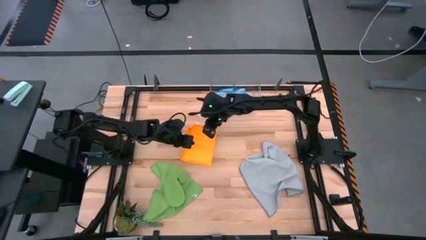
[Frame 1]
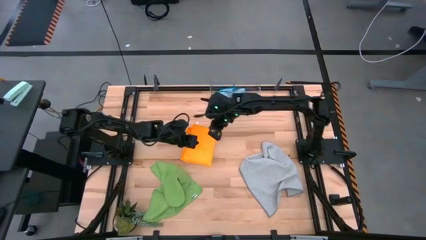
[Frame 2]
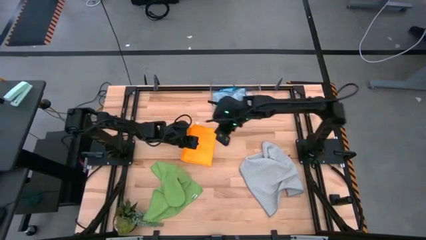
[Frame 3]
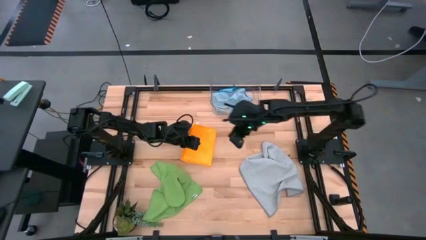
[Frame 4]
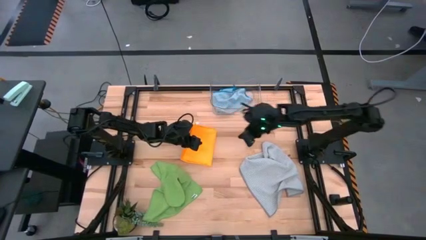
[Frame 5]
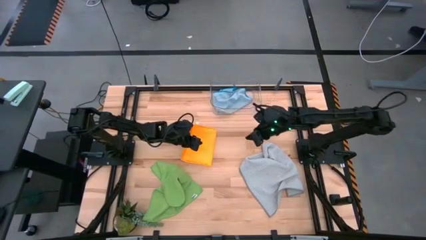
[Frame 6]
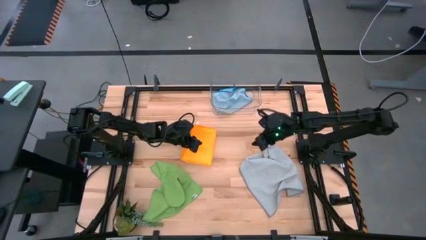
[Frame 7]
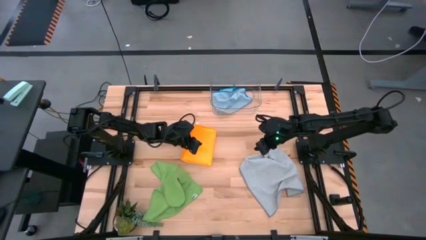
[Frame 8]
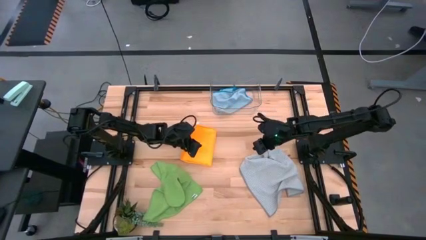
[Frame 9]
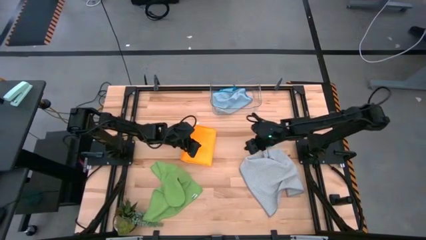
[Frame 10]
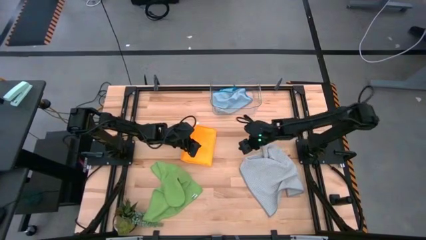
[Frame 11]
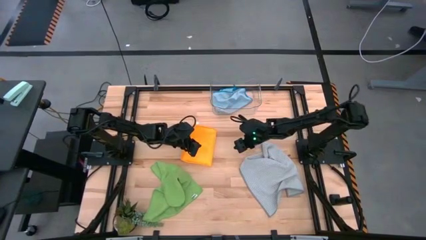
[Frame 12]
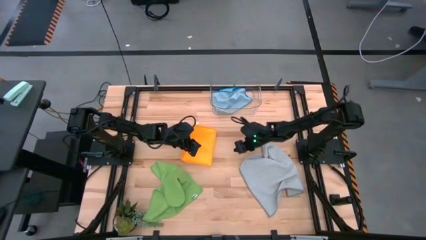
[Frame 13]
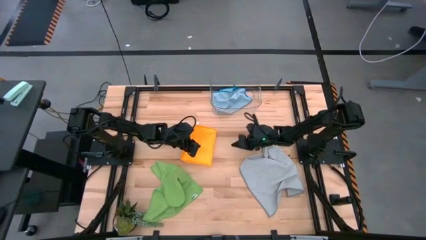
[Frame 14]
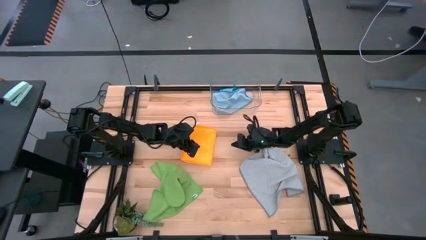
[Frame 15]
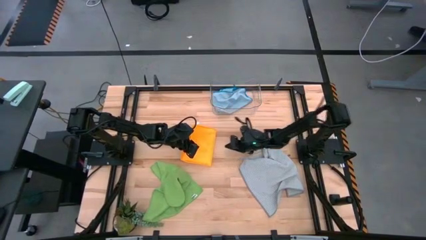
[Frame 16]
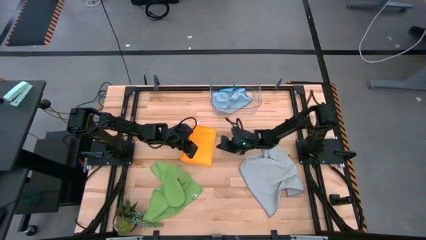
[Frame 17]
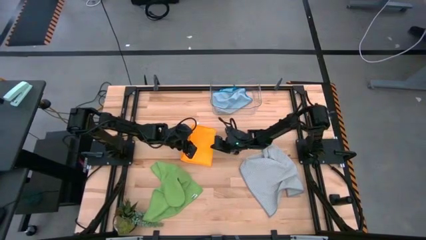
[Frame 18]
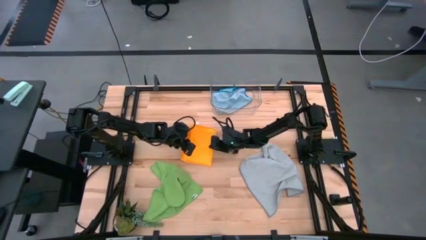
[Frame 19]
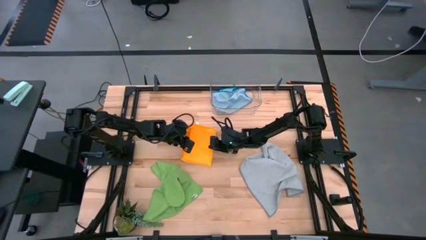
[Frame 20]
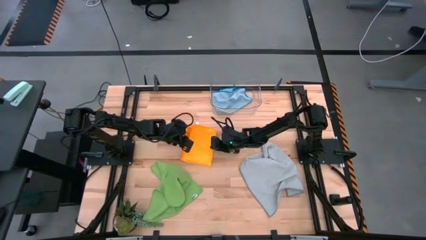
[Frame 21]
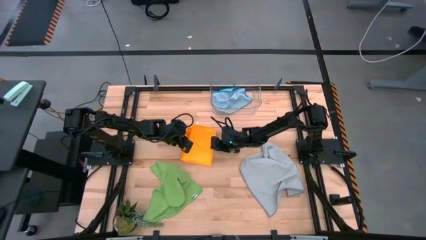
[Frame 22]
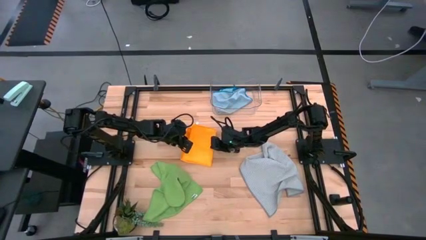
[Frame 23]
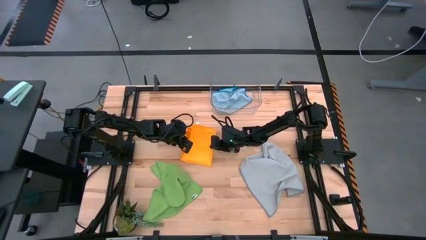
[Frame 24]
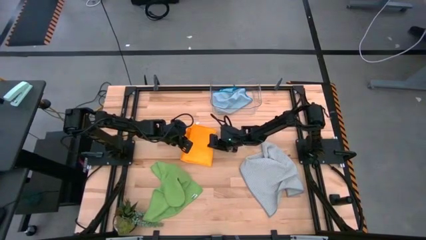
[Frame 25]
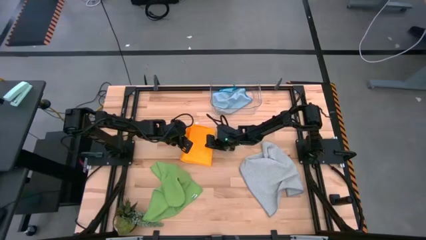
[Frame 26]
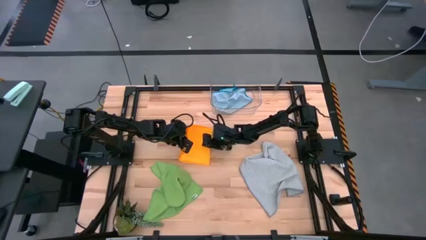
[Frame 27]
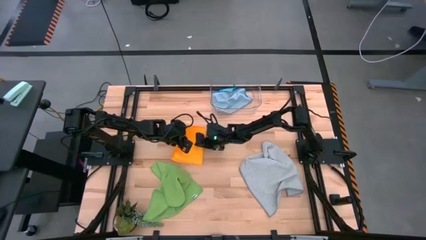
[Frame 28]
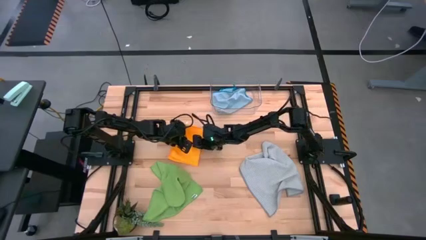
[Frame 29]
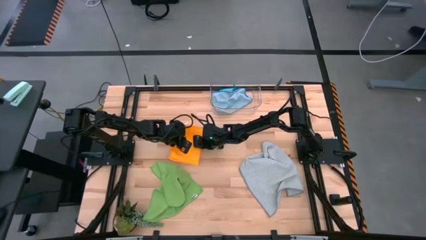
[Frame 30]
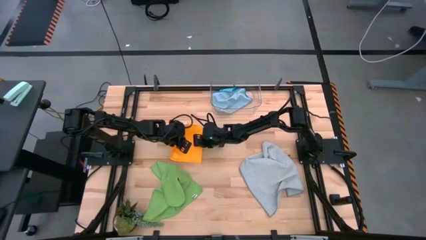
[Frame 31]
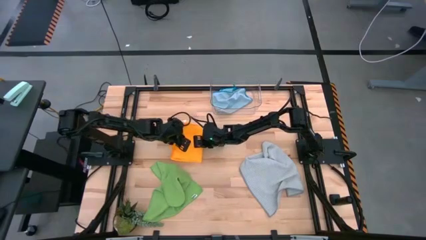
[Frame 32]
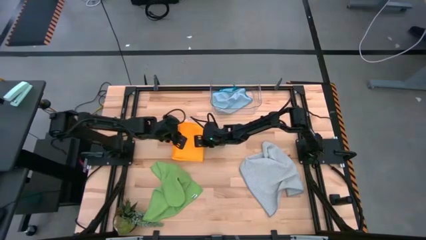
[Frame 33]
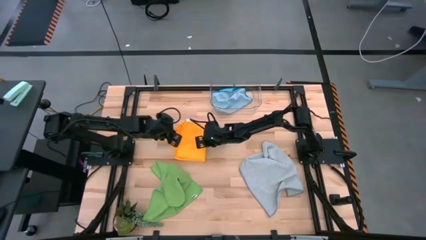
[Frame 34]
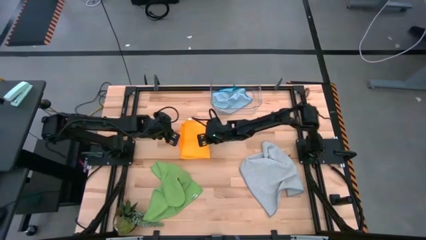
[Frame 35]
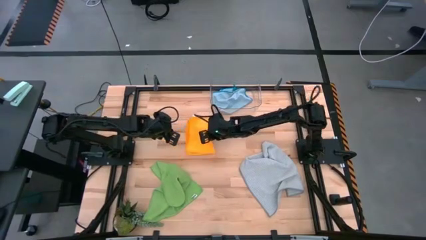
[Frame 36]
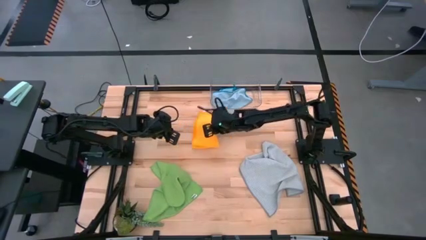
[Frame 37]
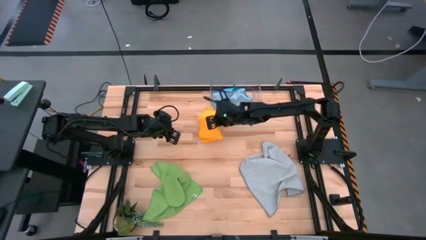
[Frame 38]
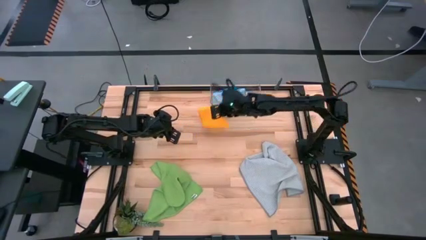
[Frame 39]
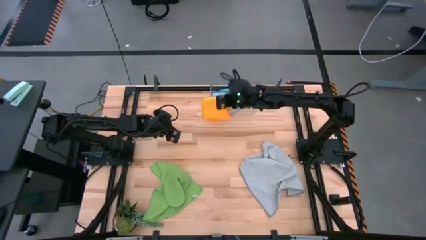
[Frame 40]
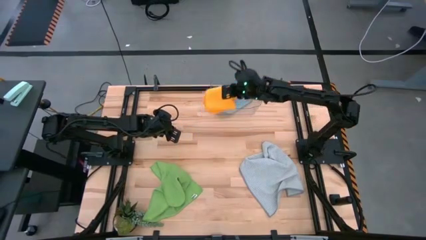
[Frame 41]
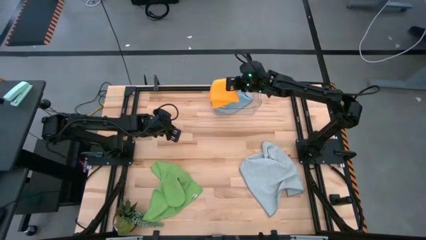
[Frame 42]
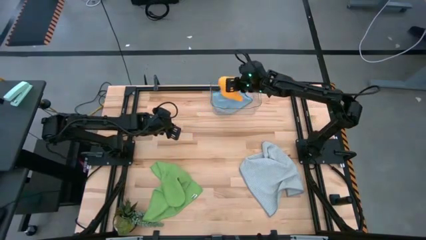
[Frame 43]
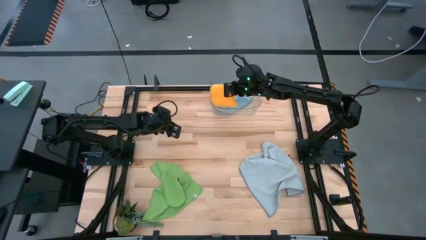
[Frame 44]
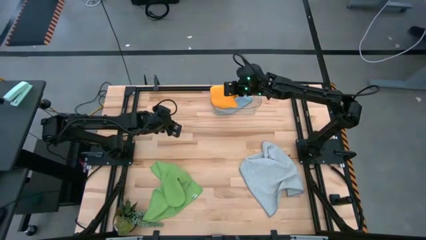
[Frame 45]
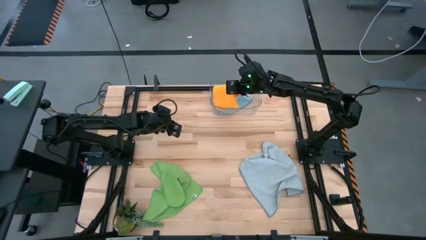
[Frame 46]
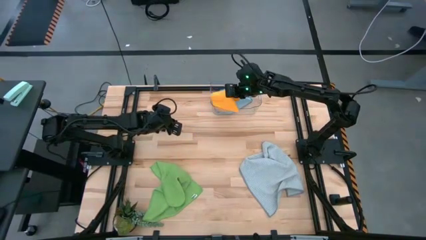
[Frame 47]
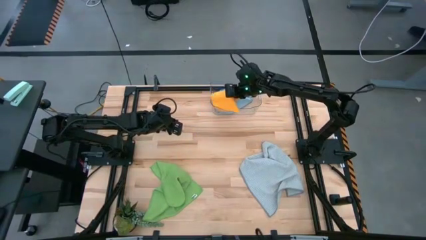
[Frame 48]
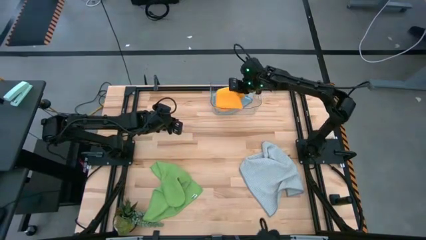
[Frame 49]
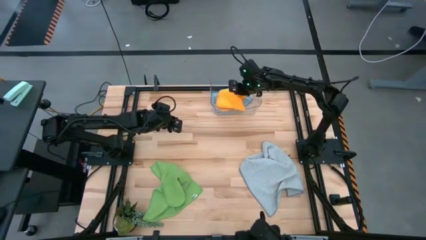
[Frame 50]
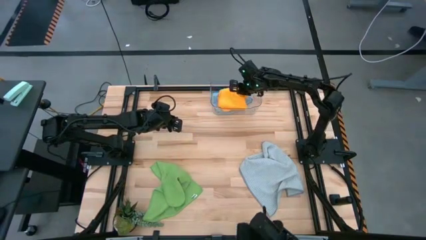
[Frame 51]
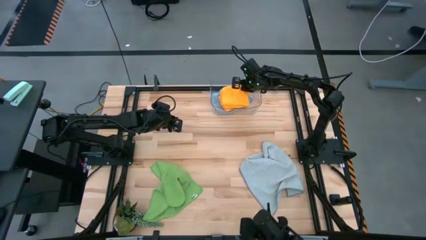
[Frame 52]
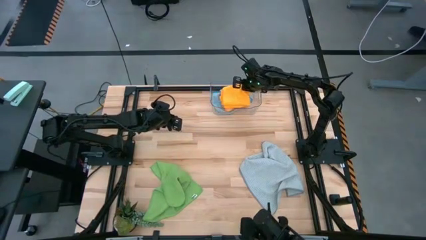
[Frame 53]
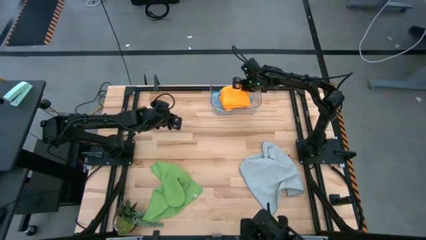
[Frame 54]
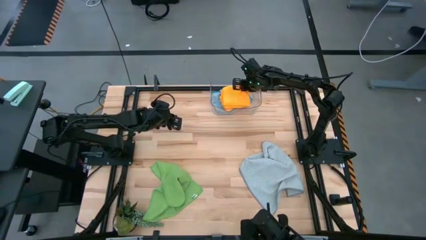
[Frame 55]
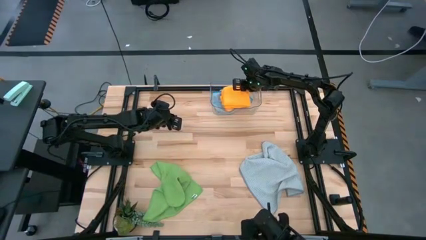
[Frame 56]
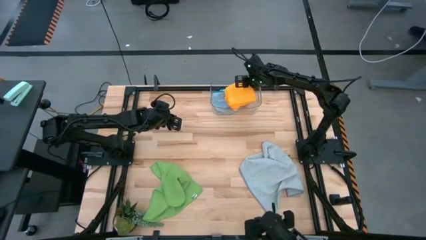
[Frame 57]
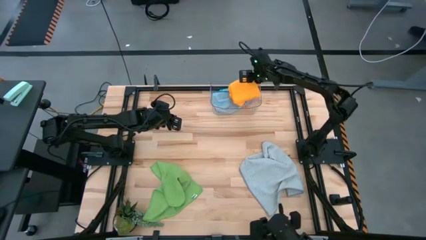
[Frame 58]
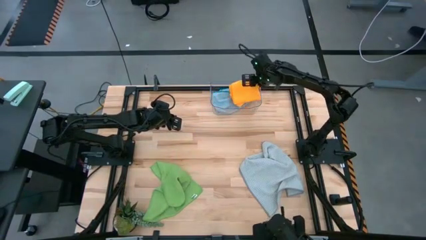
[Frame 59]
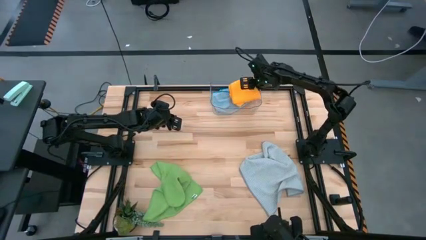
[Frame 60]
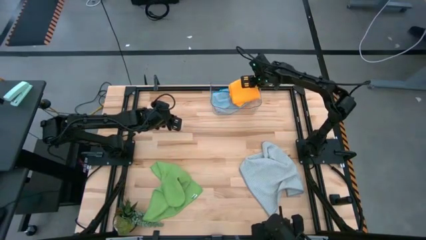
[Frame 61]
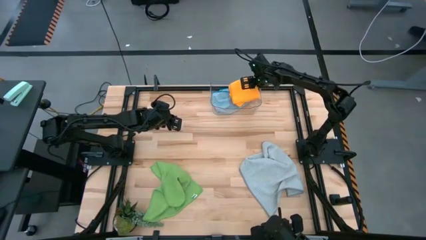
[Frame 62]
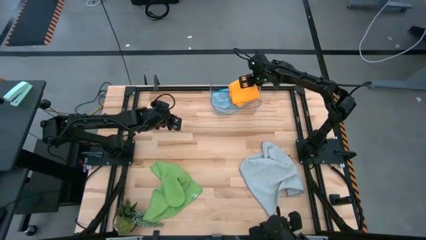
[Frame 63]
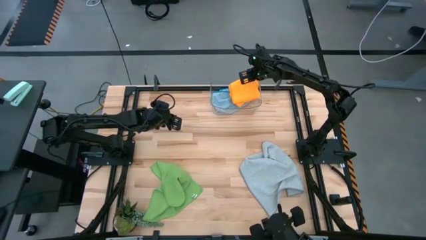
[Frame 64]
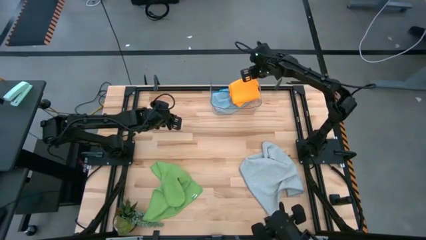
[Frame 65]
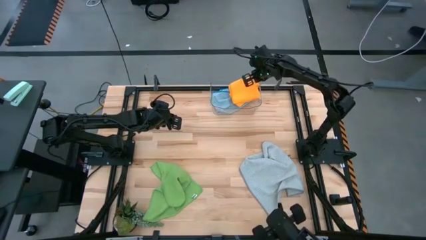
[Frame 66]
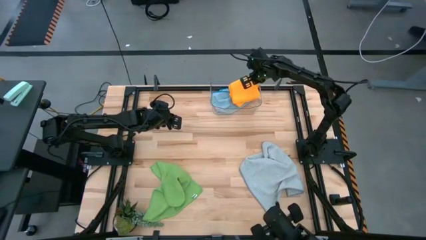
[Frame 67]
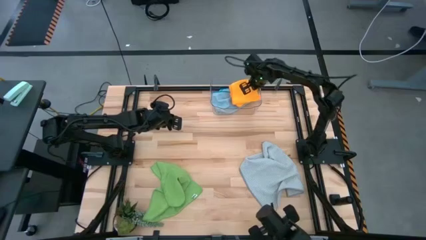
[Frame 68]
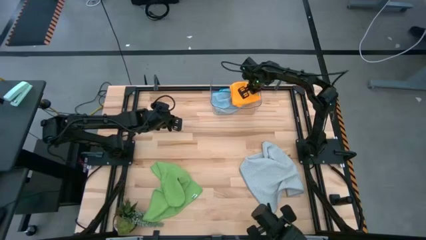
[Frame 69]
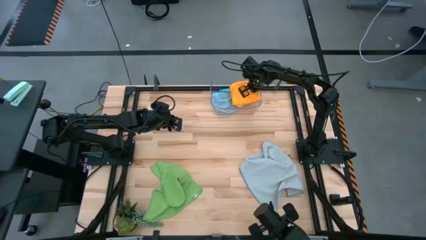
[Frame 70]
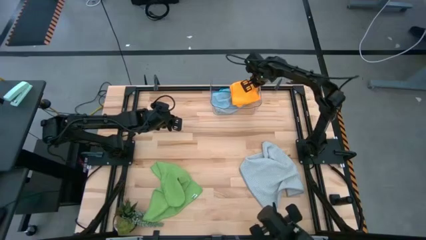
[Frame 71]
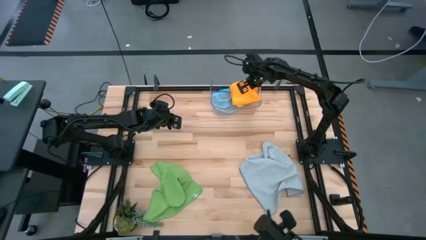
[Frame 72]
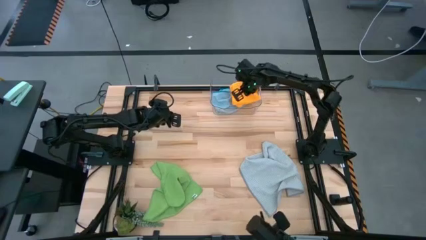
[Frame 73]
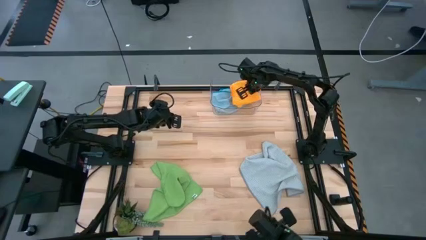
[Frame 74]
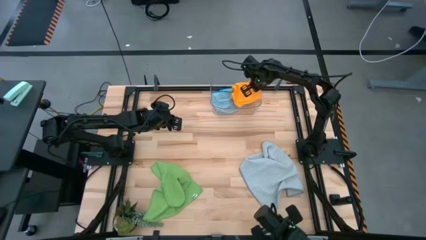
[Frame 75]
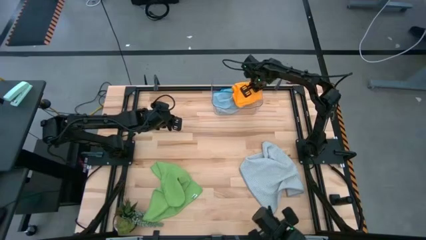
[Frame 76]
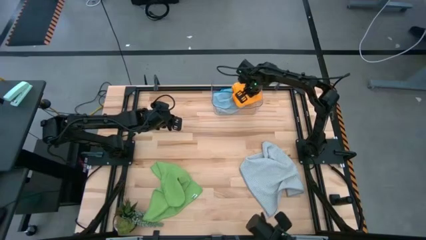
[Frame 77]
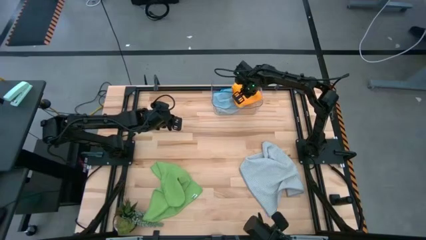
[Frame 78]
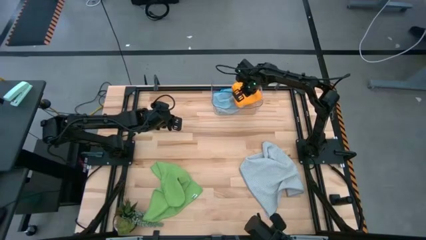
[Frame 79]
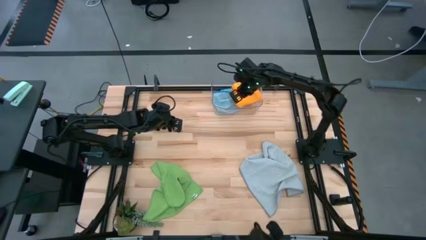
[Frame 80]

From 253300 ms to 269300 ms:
Task: Fold microfiber towels
Put the orange microfiber cloth into the transparent bin

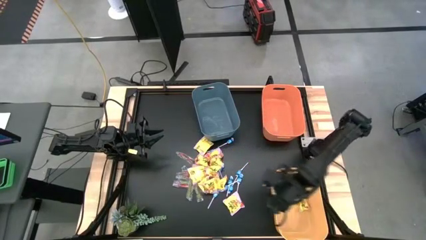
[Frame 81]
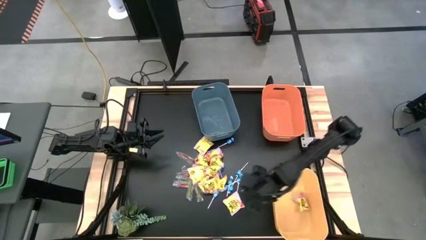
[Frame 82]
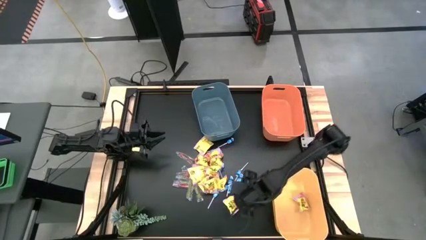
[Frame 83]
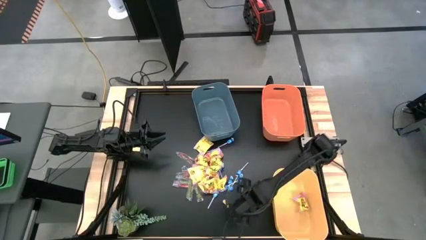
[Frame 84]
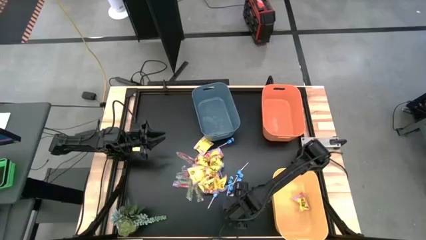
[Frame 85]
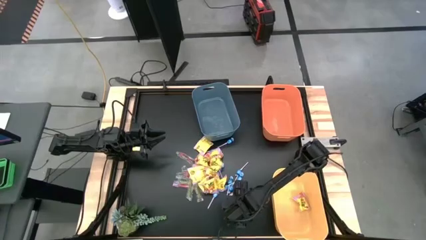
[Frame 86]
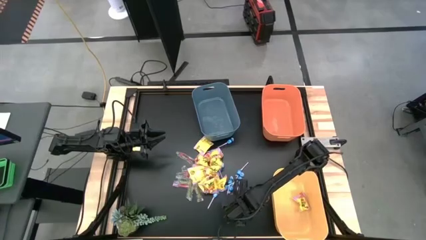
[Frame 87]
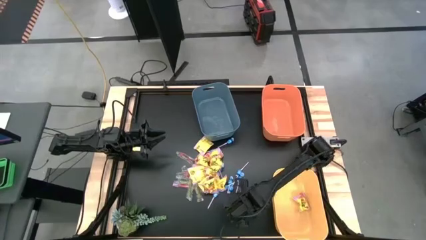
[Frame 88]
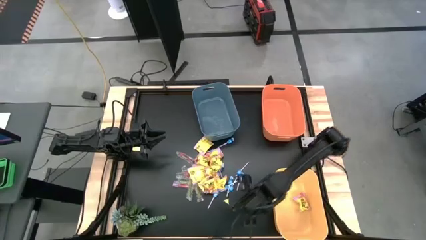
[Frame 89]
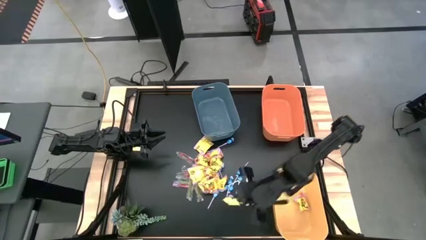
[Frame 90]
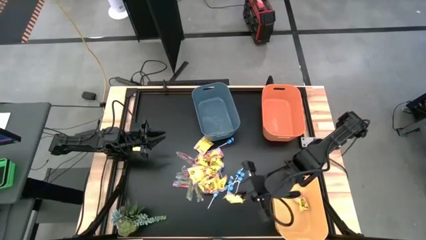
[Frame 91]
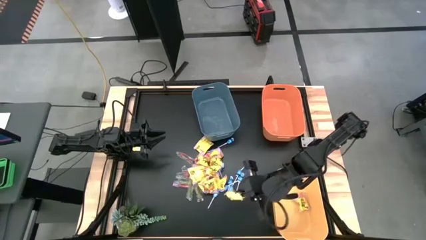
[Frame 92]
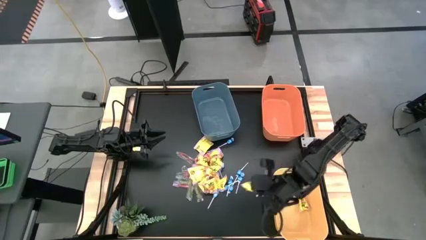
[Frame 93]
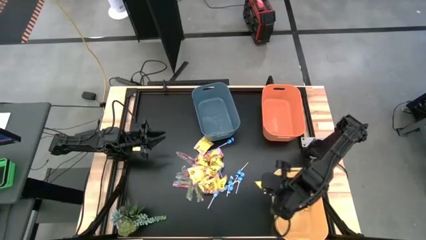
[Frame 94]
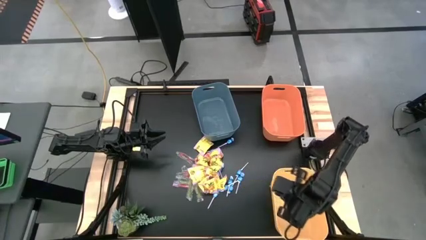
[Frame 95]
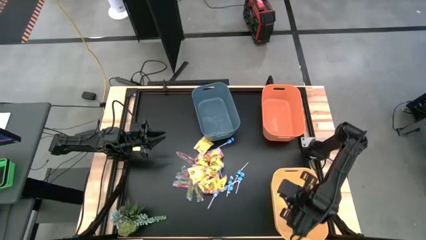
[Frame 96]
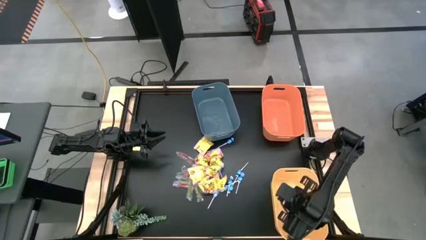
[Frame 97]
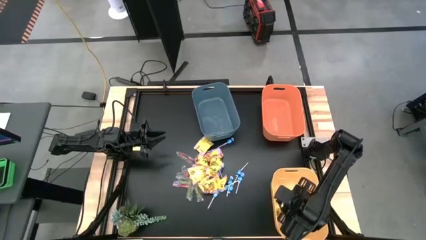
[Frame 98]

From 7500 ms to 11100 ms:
Task: Sort candy
Put the yellow candy into the yellow bin
